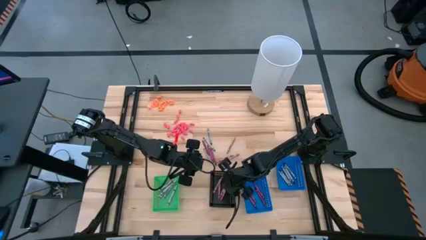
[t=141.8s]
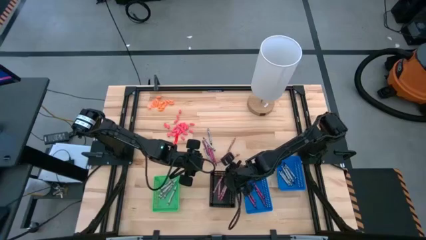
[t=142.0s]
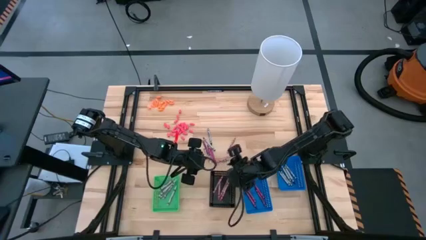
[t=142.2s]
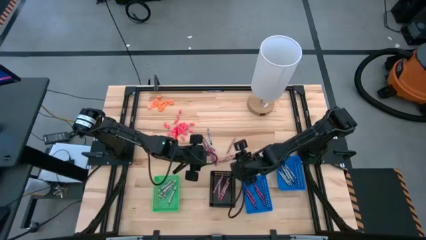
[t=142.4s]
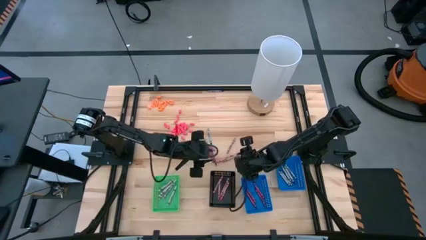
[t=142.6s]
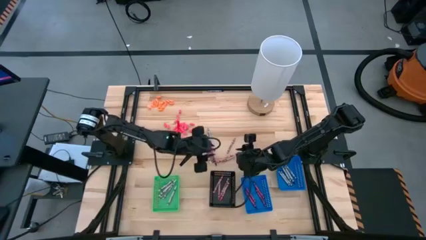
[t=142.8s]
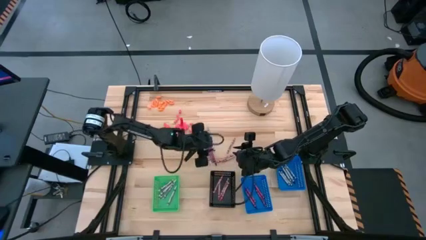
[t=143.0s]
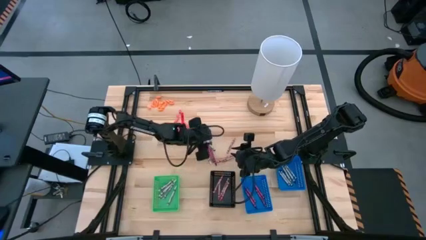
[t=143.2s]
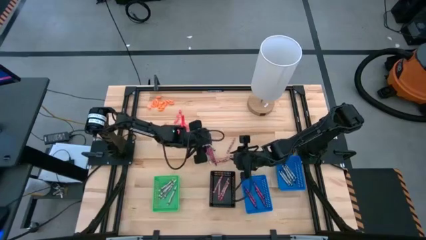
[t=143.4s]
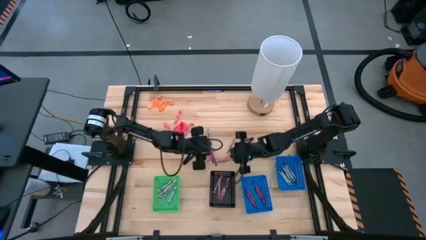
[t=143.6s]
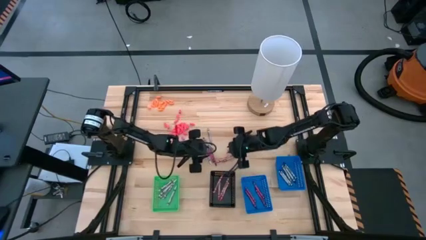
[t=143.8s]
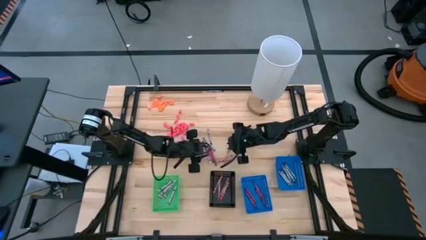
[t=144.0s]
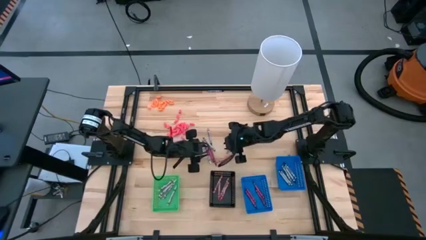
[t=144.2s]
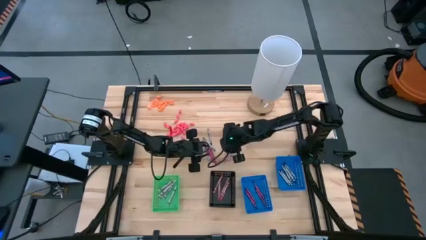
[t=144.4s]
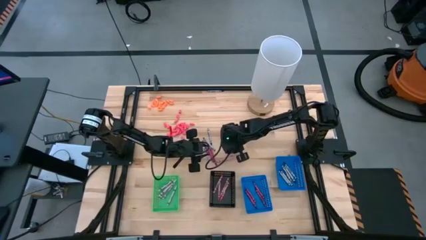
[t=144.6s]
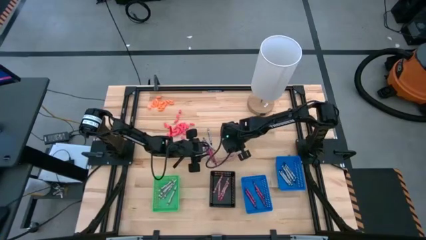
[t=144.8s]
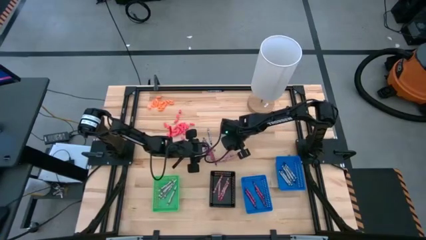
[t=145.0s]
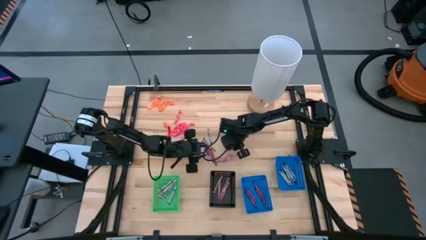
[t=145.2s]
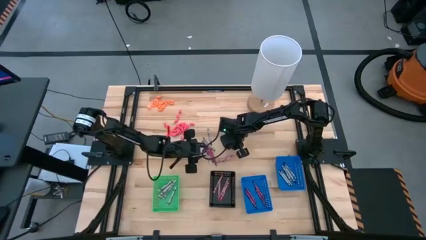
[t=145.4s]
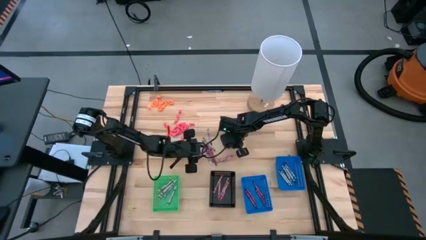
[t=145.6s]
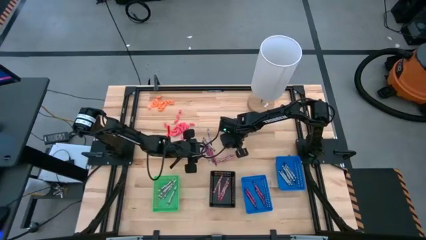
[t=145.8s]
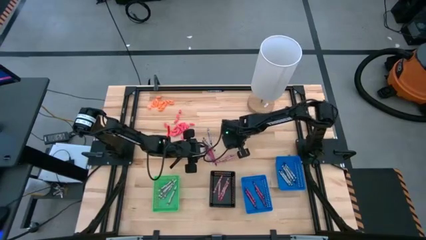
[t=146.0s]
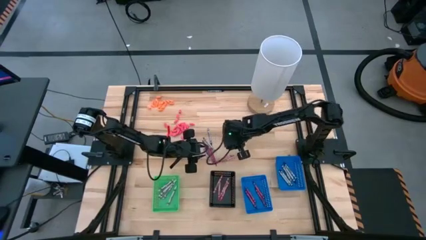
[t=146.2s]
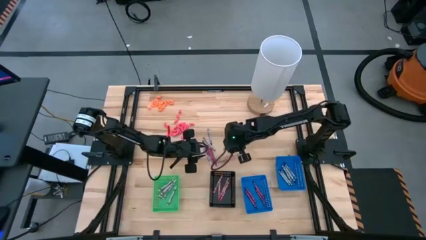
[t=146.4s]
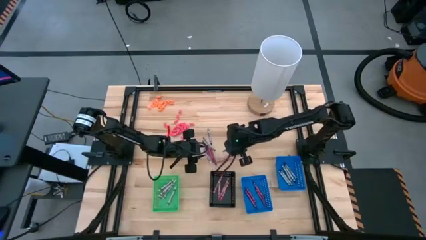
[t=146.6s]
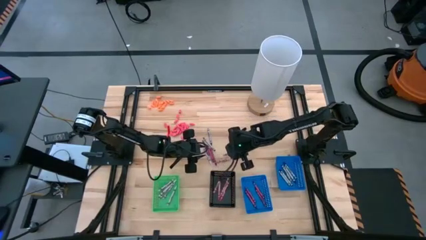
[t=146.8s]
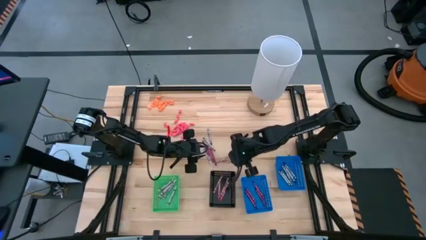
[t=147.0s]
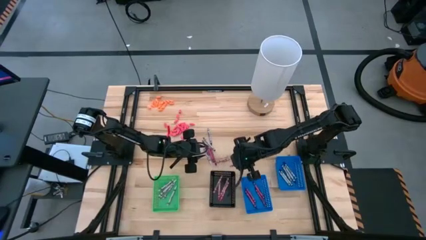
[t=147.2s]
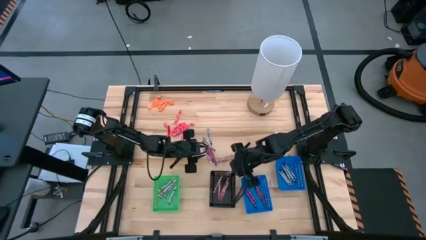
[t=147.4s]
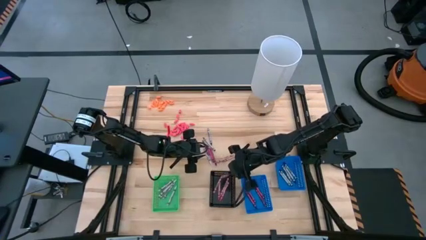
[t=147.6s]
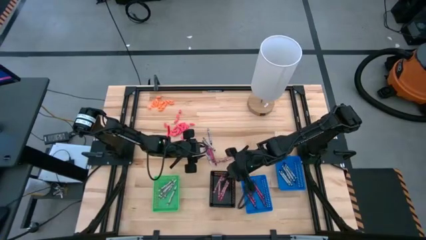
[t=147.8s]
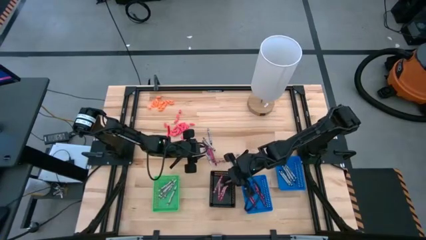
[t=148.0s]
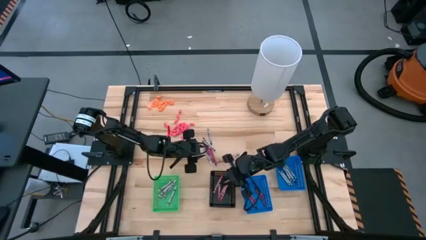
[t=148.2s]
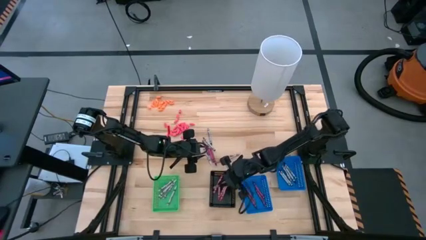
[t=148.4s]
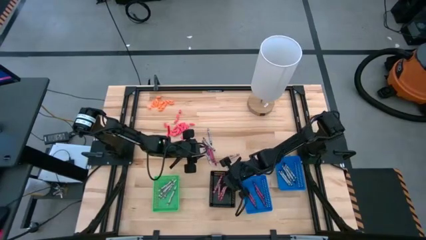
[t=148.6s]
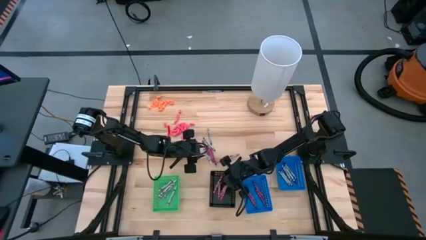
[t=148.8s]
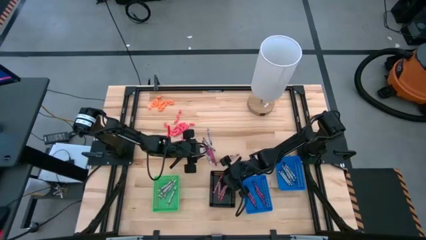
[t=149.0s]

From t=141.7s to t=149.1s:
Task: Sort crayons
Put the pink crayon into the black bin

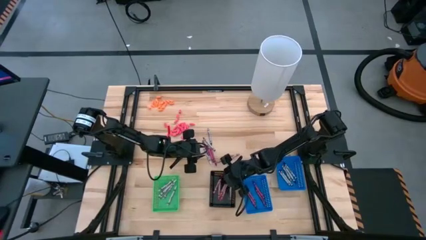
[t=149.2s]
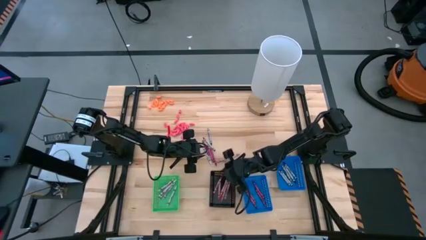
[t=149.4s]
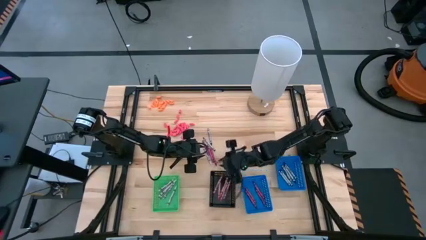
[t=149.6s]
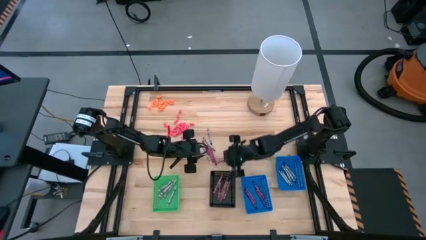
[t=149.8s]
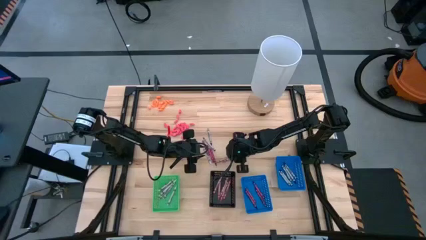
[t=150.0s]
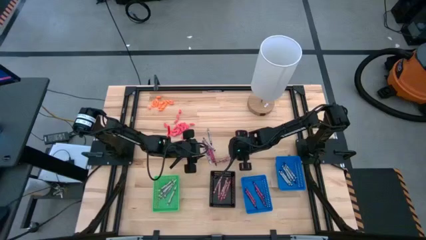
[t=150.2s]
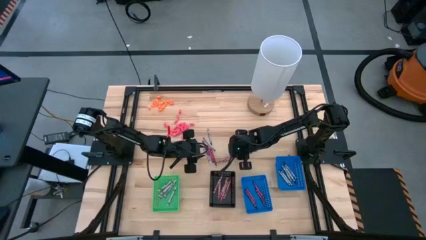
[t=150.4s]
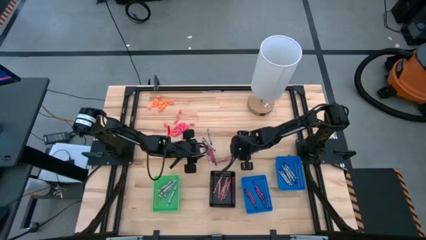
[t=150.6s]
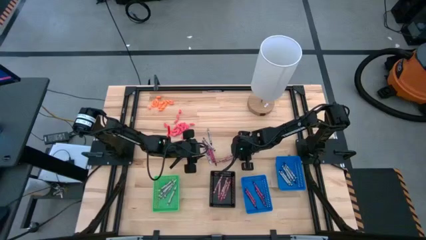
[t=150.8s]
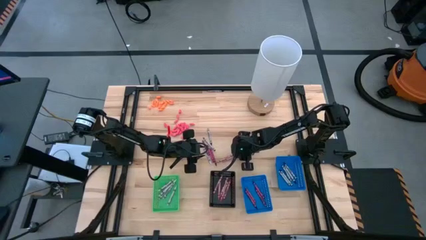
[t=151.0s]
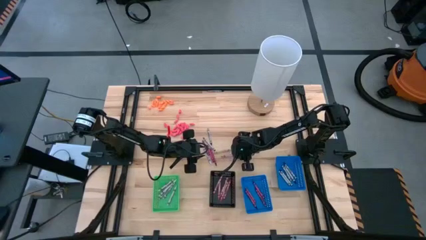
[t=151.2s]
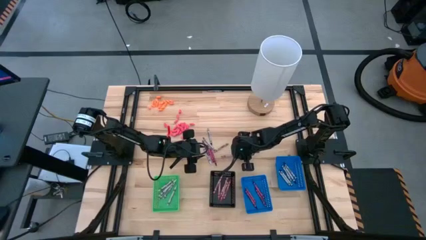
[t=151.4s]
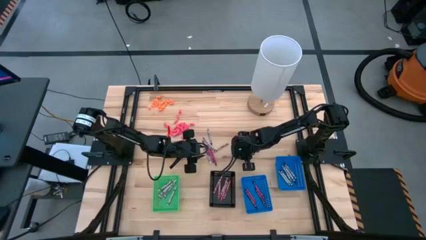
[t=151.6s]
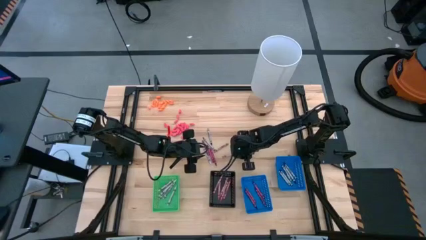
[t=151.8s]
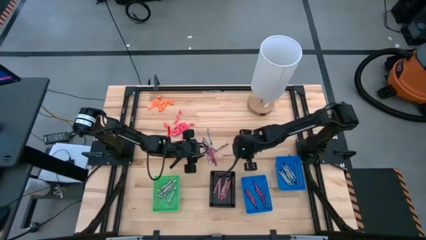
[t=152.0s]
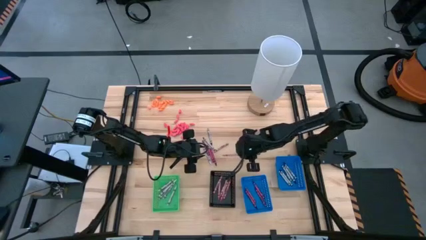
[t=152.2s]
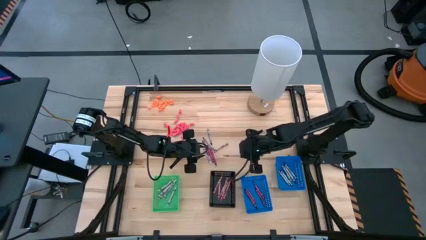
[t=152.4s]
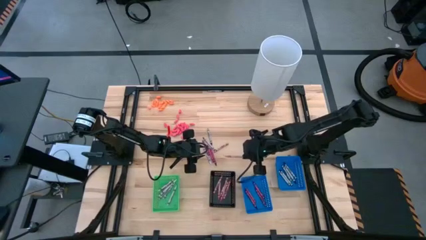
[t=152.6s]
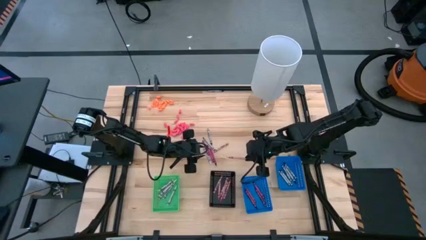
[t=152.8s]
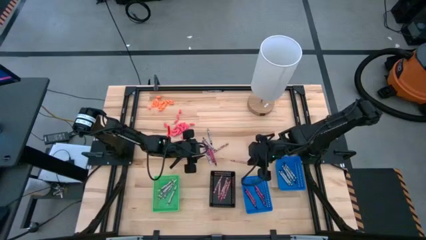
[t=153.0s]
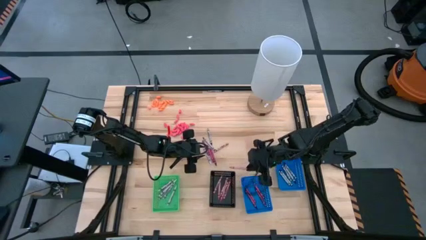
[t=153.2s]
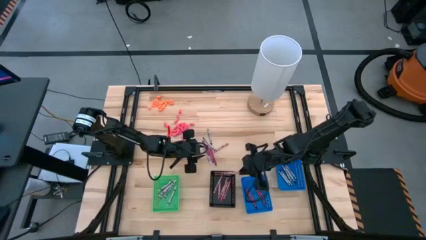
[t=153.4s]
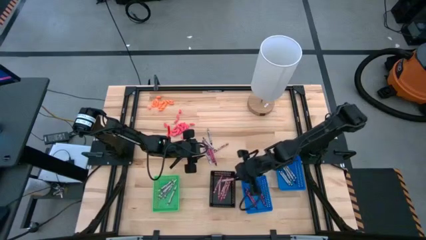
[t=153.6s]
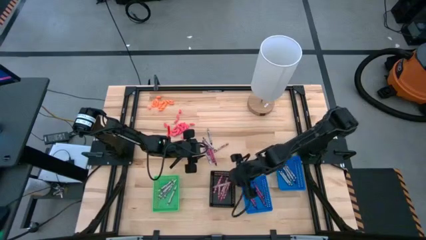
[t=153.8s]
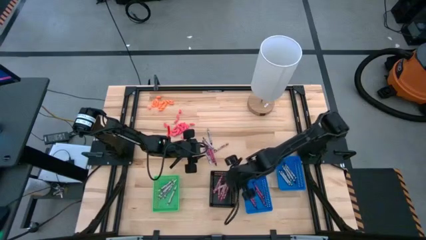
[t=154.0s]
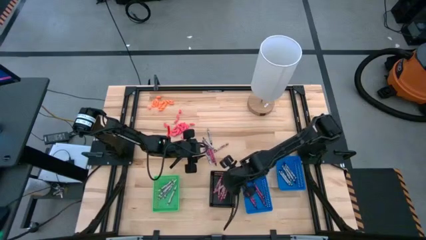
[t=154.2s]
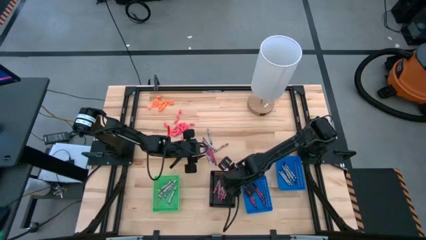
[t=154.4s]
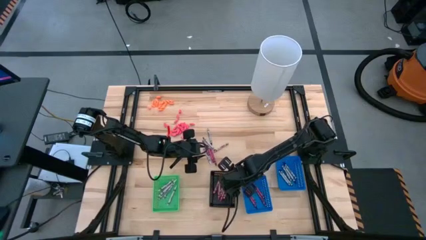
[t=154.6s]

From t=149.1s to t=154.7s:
Put the pink crayon into the black bin

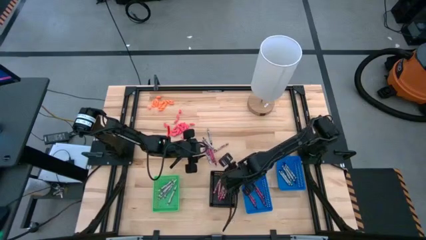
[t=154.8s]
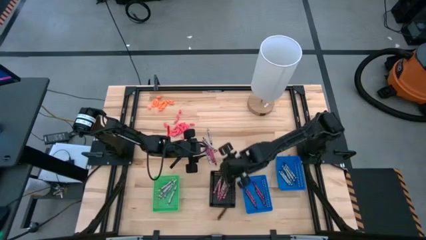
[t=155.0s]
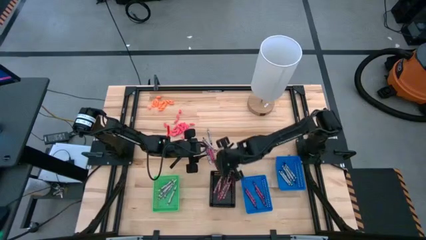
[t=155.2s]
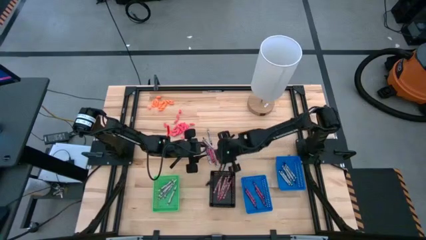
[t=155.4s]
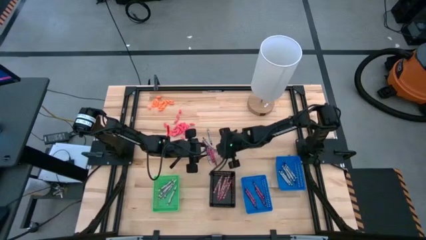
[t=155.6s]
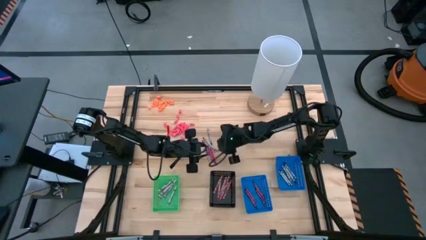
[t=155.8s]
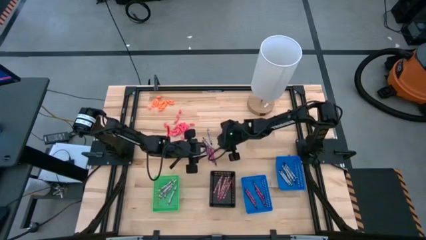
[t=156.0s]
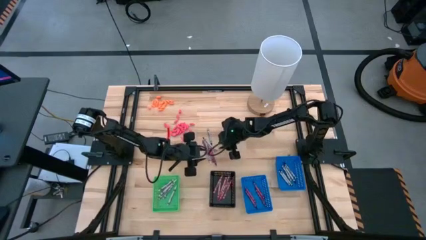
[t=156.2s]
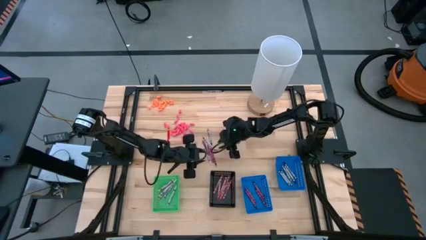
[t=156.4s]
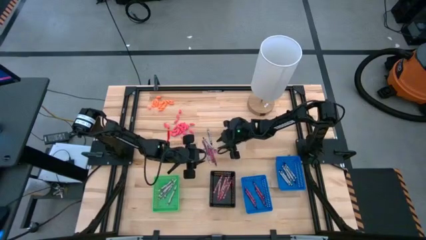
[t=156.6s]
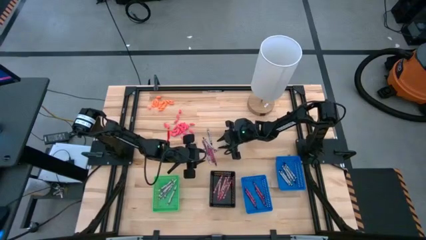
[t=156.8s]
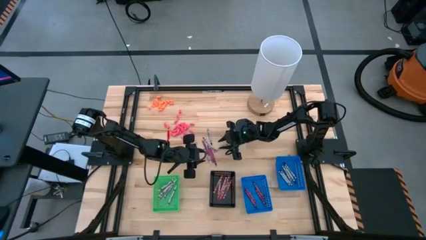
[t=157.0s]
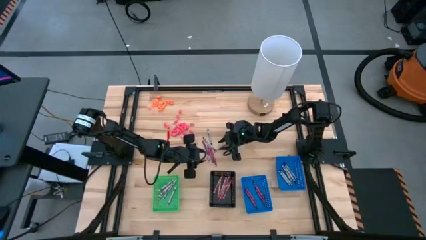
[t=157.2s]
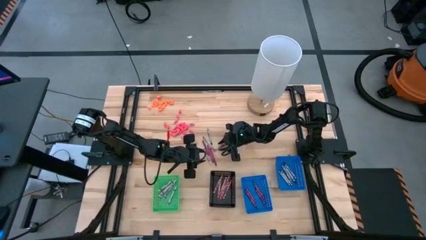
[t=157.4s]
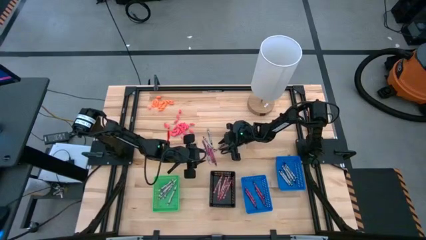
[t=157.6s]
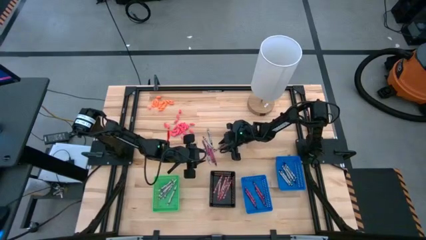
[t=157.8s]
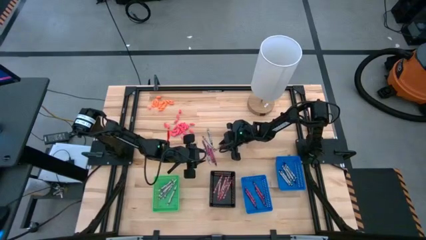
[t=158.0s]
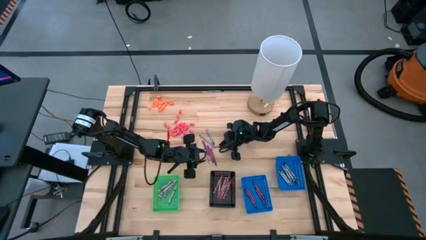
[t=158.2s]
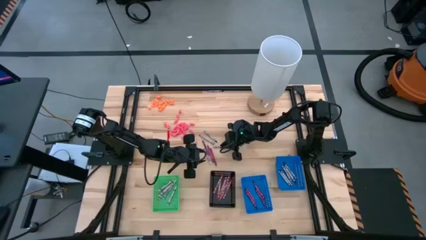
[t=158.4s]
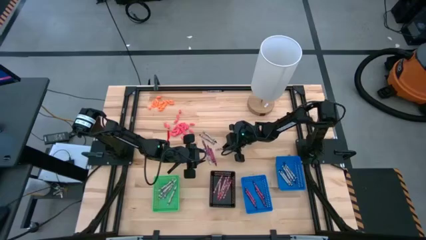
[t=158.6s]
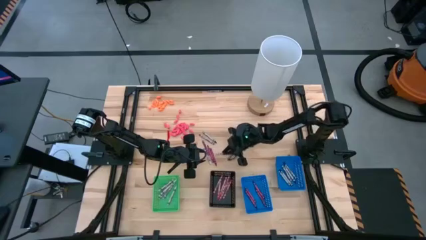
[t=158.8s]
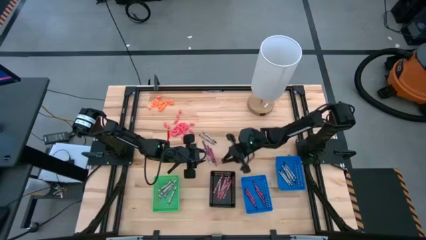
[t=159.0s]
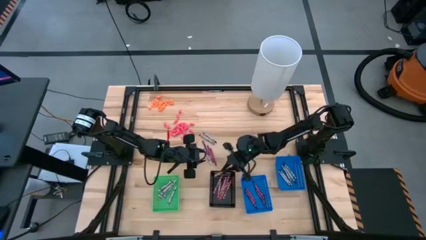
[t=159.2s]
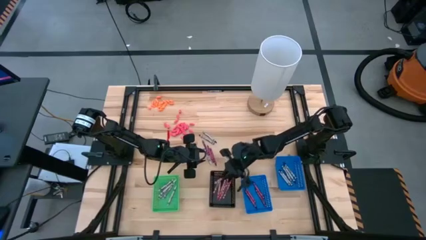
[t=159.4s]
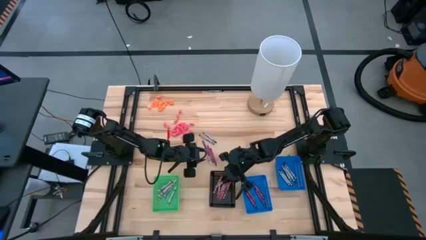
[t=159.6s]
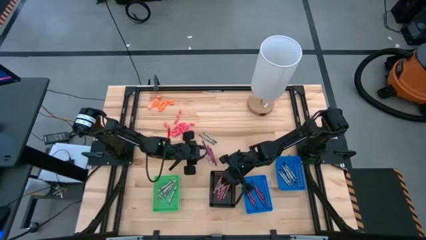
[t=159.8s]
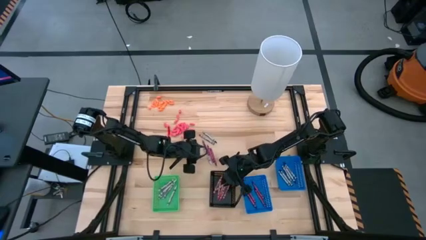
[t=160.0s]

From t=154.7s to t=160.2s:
Put the pink crayon into the black bin
